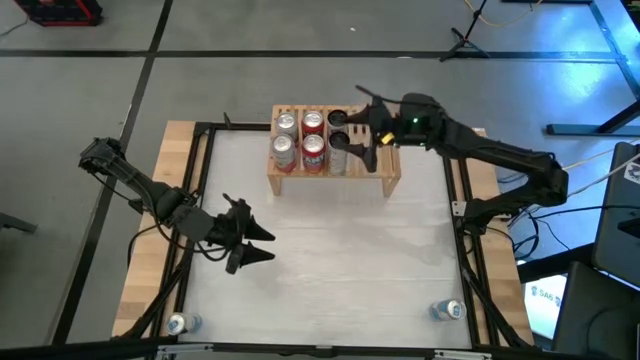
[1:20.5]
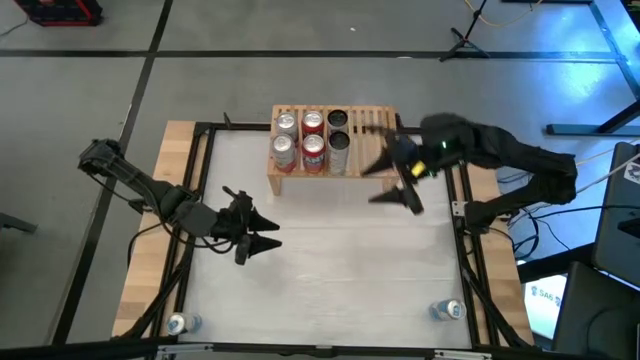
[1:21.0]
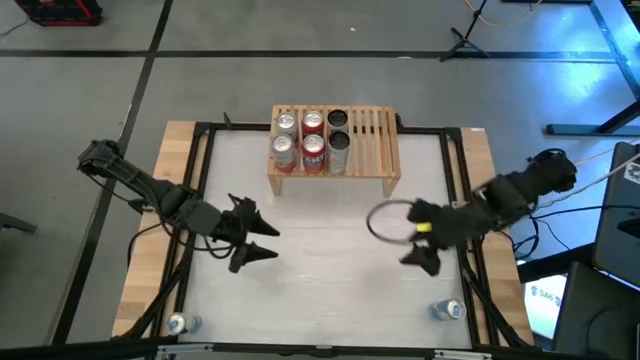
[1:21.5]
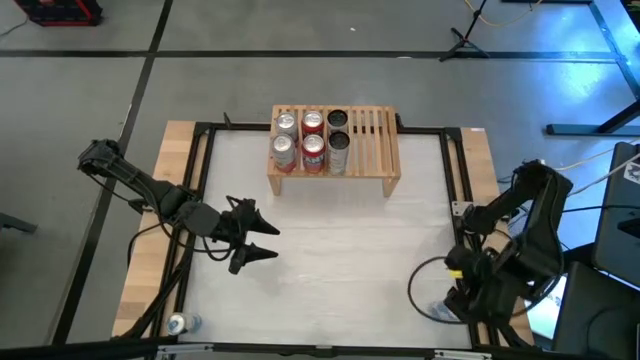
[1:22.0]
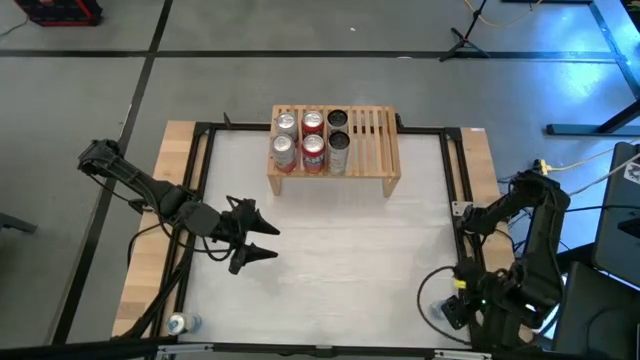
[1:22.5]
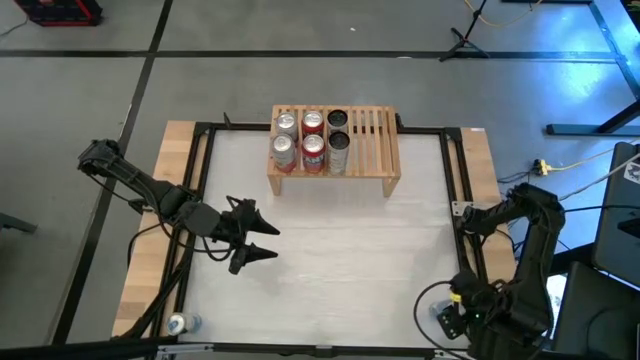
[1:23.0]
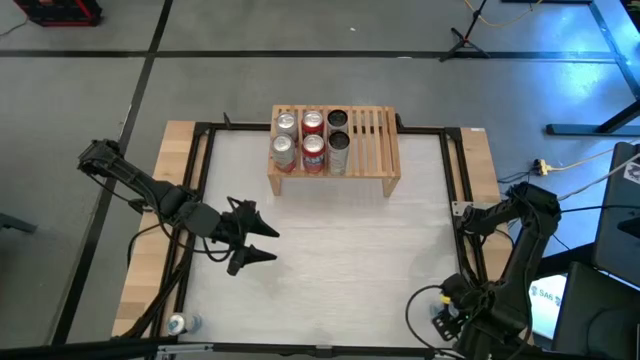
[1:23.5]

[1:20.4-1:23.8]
Task: Place canned beverage on shelf
Put the right blue soda can on the shelf

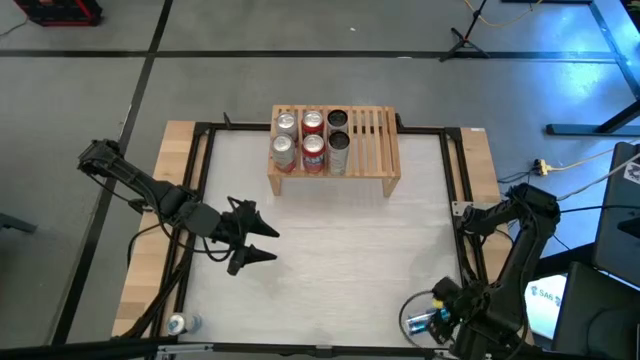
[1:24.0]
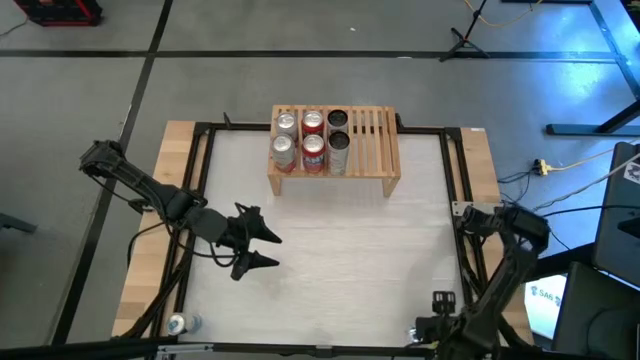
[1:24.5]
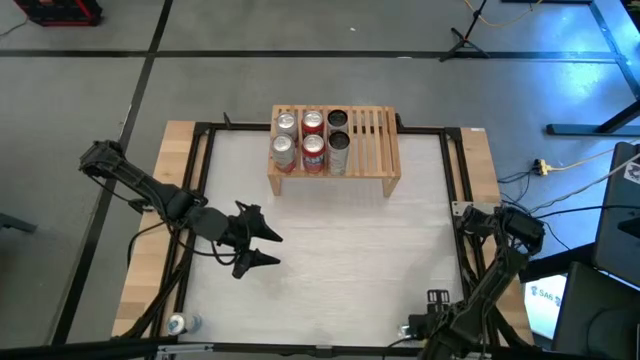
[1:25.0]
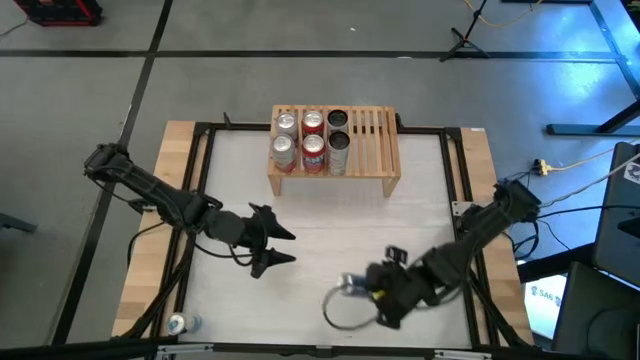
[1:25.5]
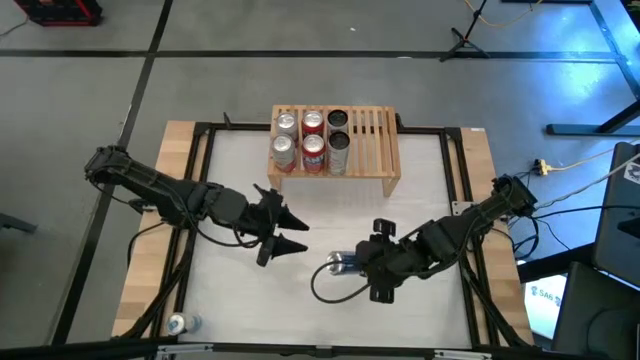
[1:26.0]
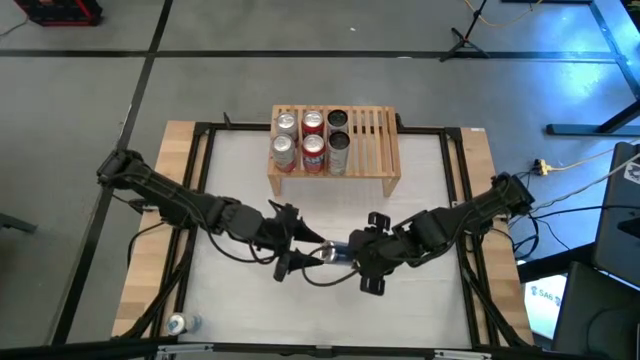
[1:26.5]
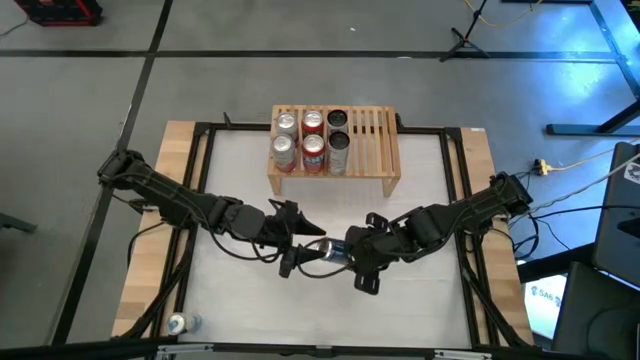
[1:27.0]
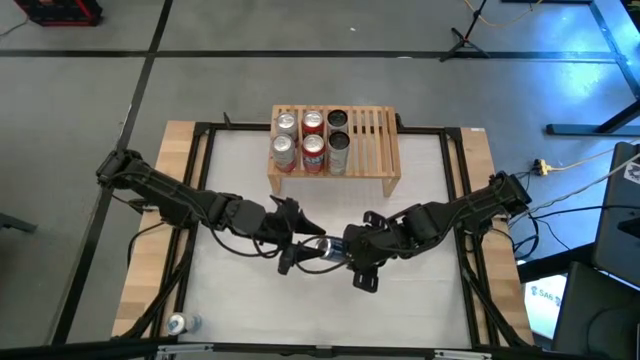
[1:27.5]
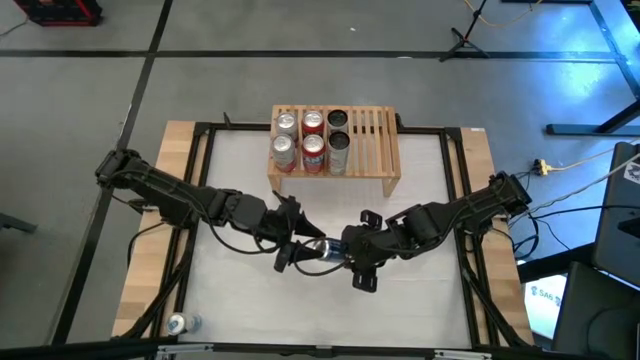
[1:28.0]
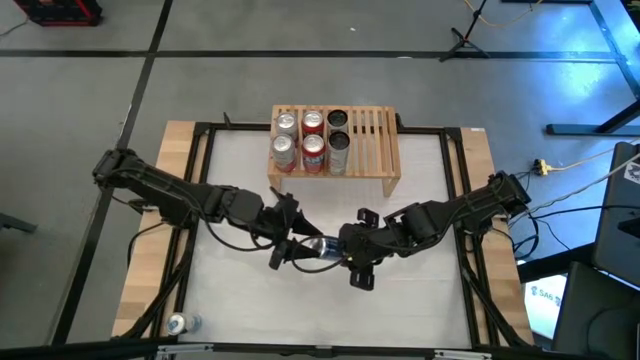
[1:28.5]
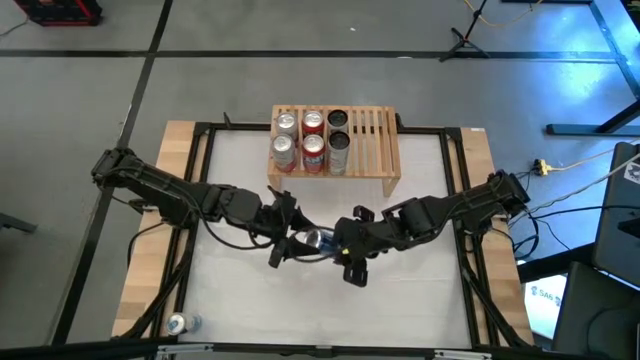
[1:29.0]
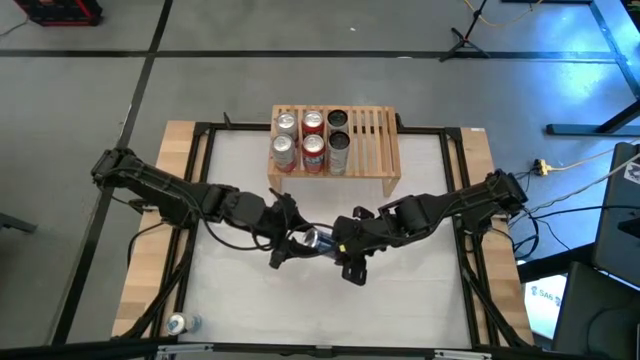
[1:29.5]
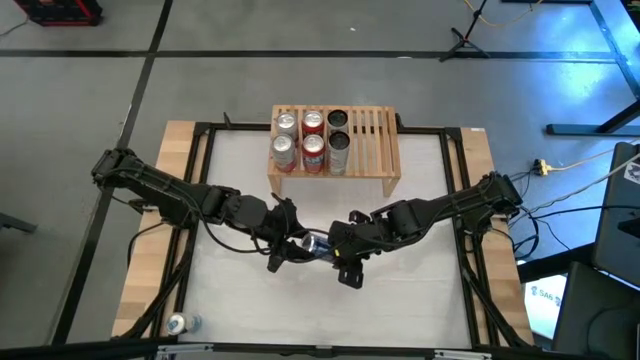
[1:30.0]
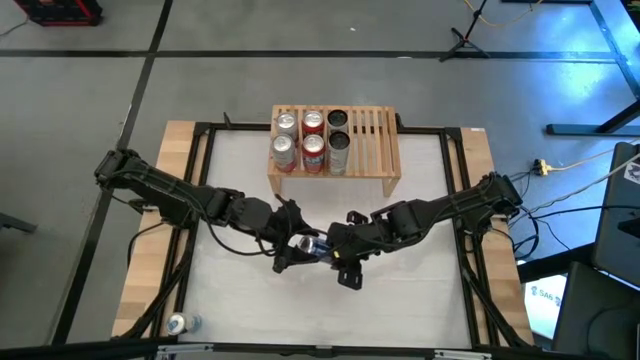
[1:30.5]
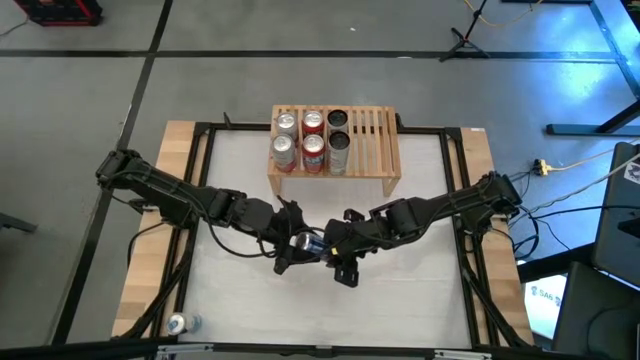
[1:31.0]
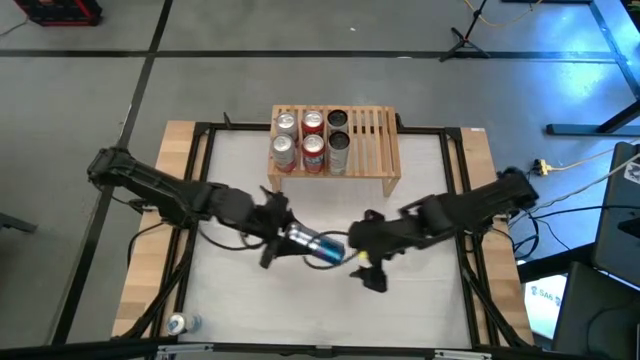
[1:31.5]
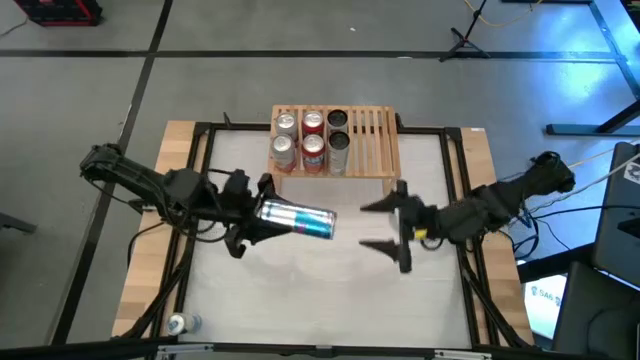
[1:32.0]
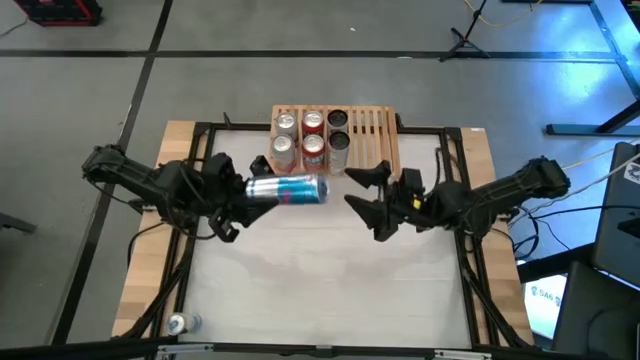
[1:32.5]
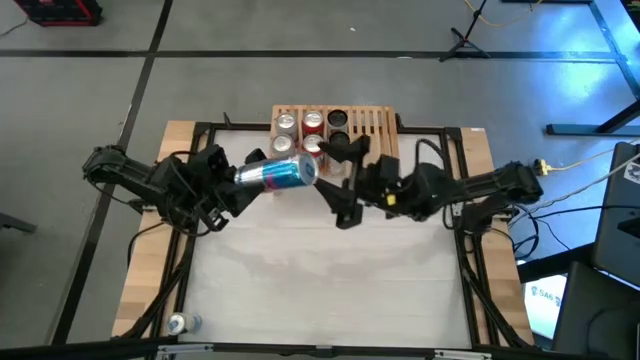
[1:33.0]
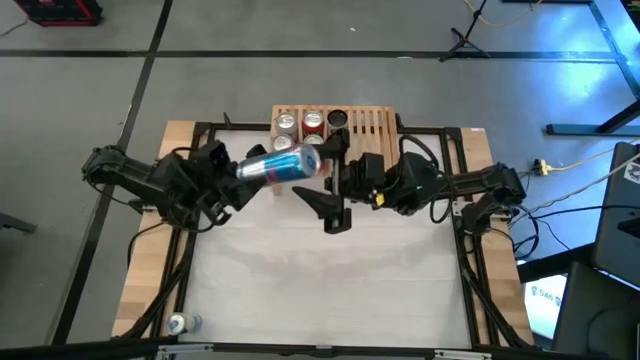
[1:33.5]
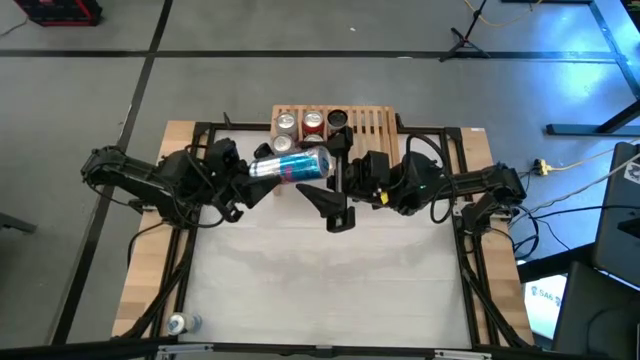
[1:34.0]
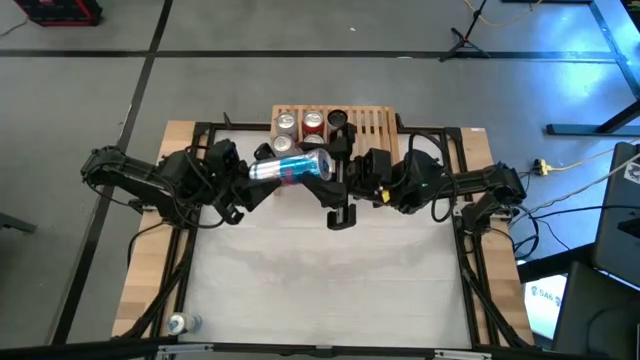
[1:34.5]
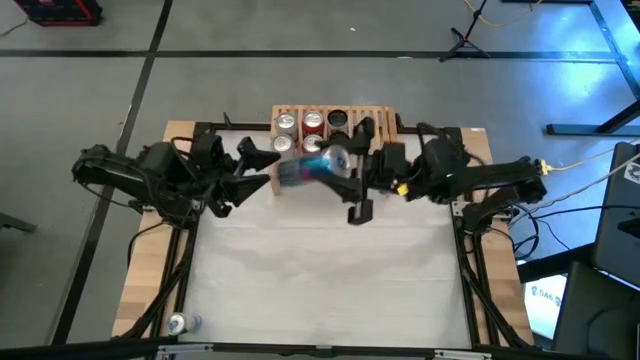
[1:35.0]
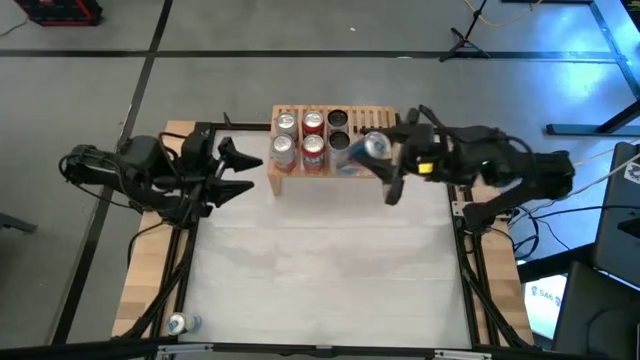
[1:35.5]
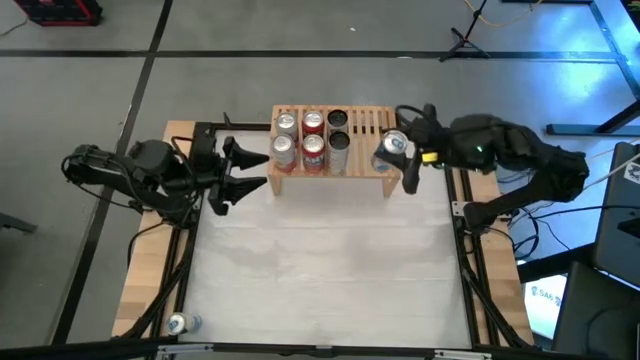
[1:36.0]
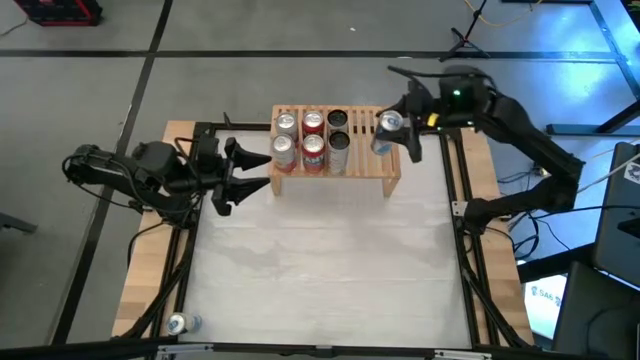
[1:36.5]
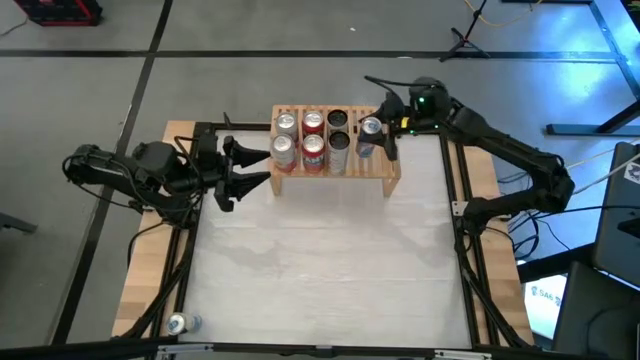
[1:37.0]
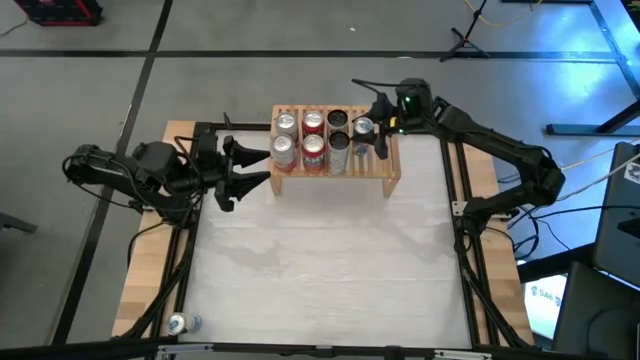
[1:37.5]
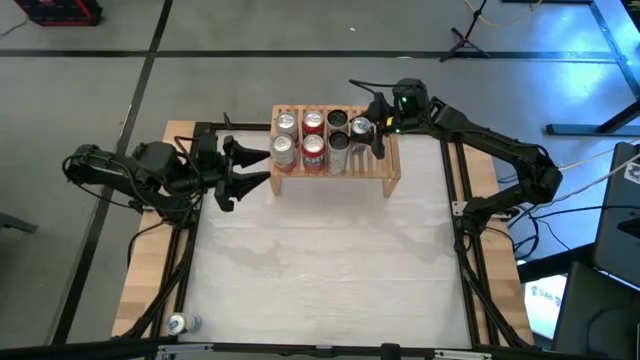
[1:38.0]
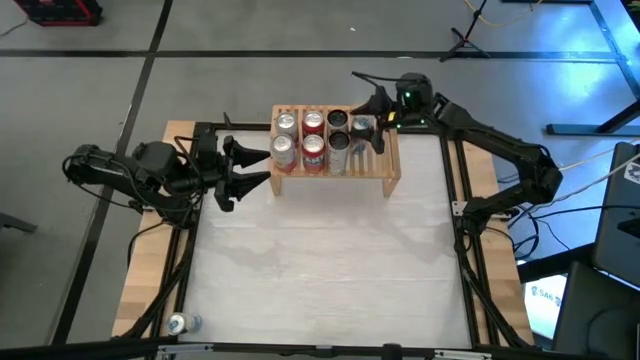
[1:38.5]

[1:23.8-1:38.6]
Put the right blue soda can on the shelf

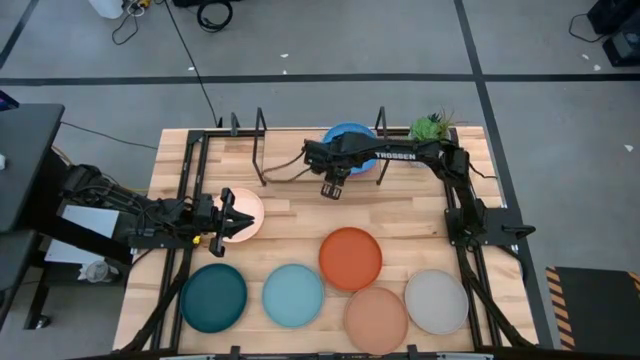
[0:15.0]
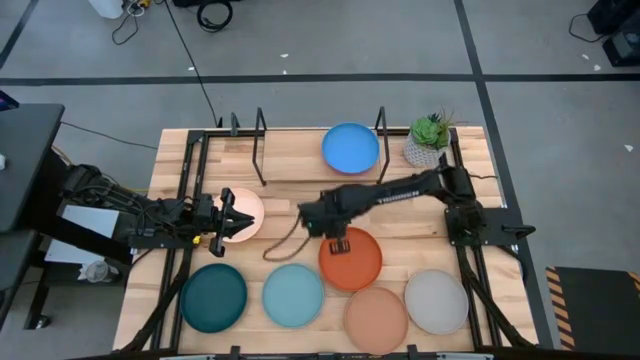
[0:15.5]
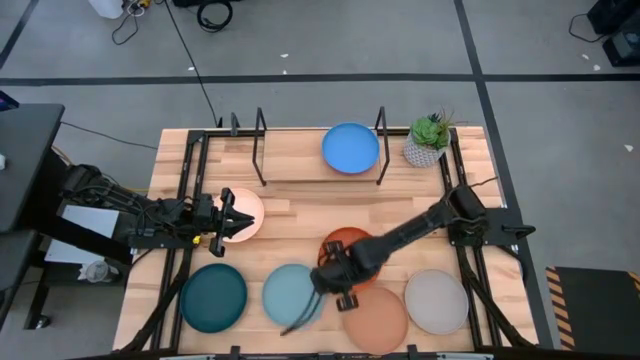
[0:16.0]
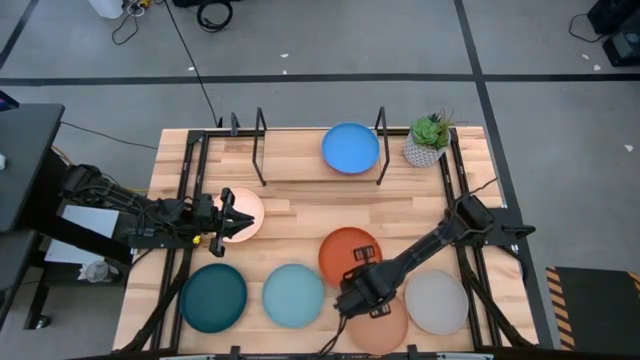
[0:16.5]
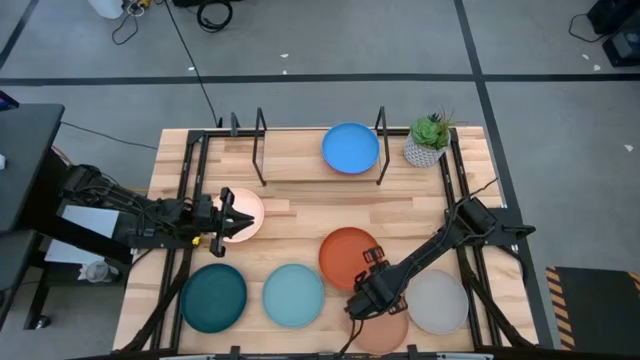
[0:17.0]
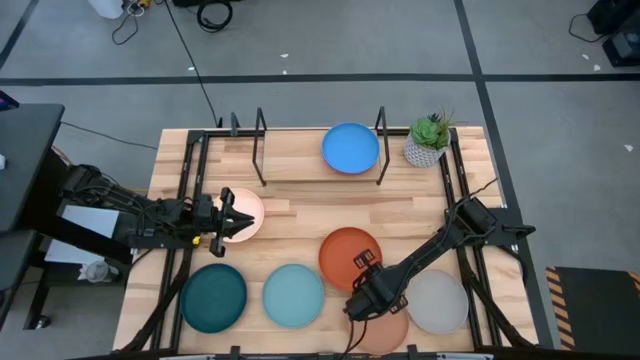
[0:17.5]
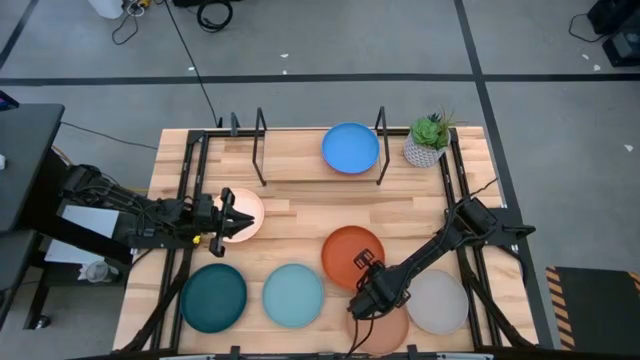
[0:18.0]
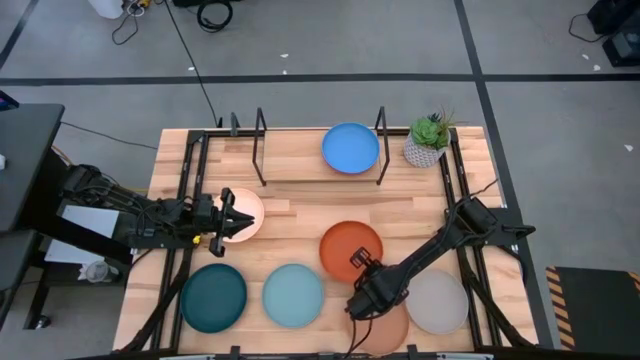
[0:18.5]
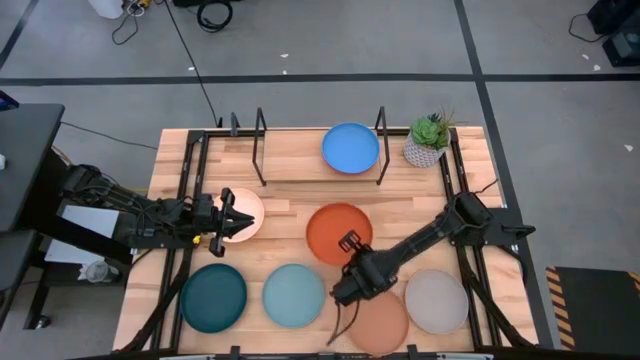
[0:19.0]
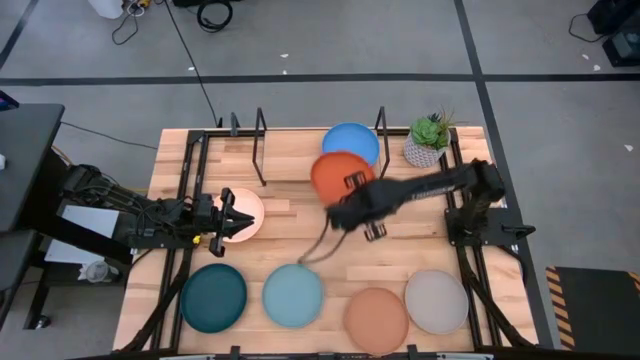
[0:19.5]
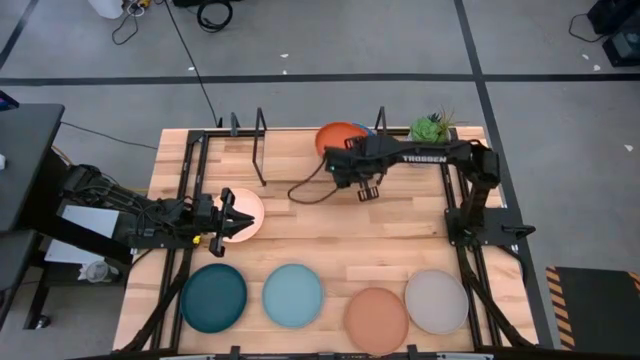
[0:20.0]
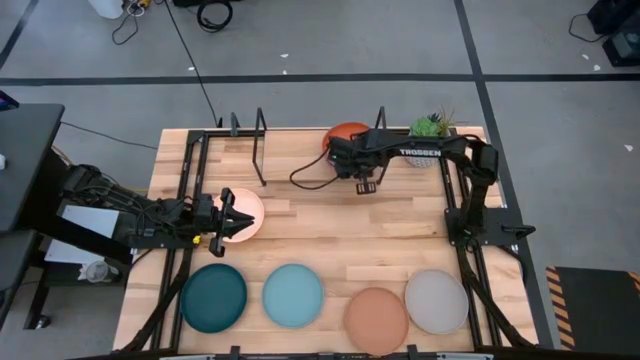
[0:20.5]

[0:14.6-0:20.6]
Task: Place and stack plates onto a shelf
Stack the dark orange plate on top of the blue plate on the shelf
